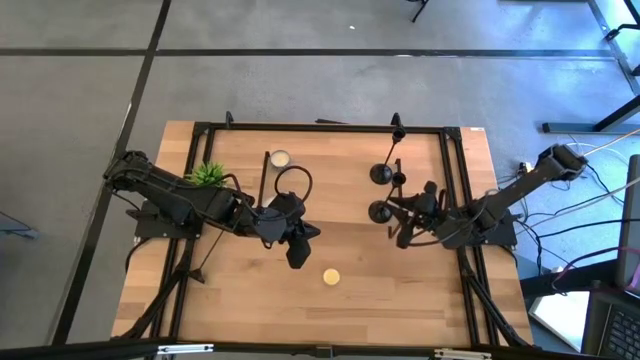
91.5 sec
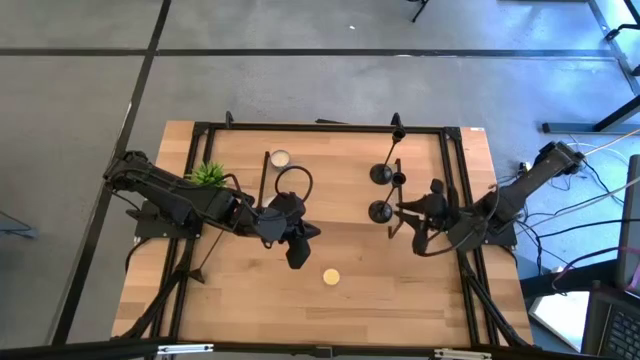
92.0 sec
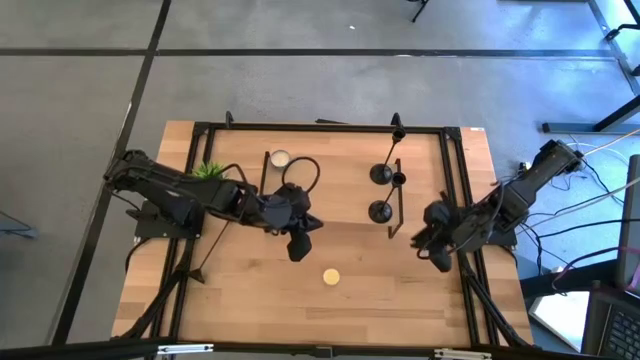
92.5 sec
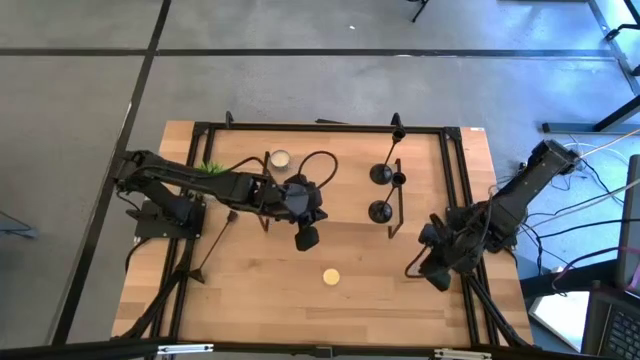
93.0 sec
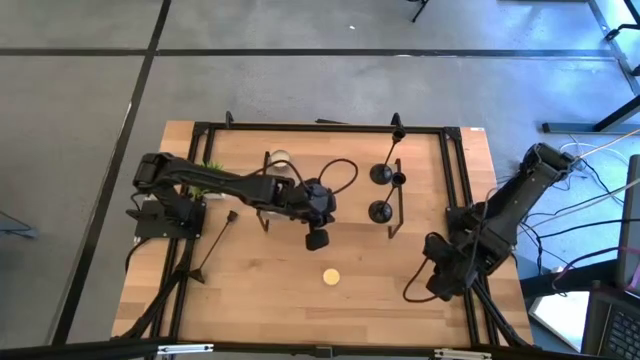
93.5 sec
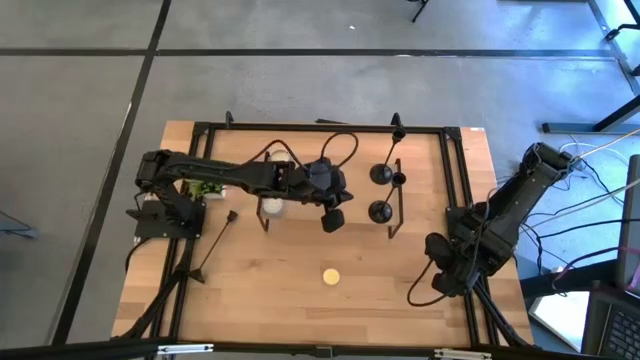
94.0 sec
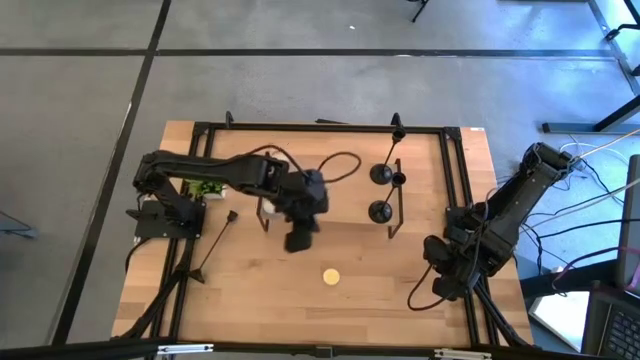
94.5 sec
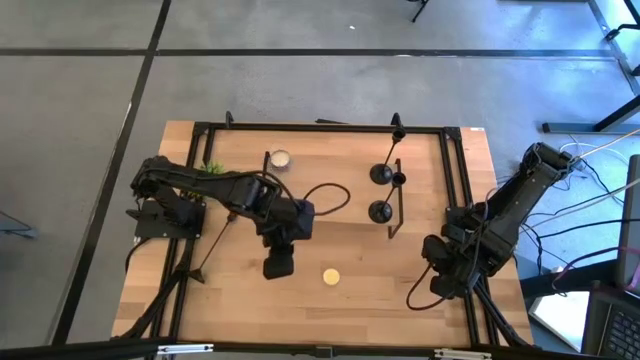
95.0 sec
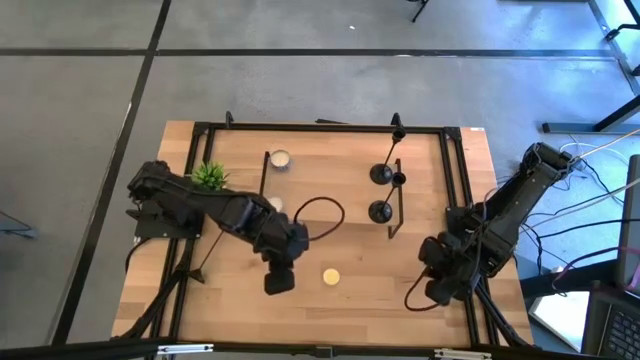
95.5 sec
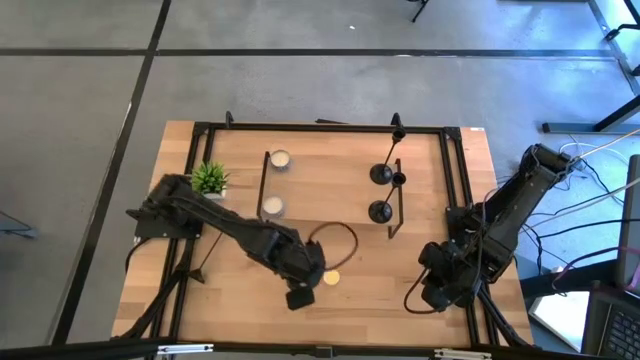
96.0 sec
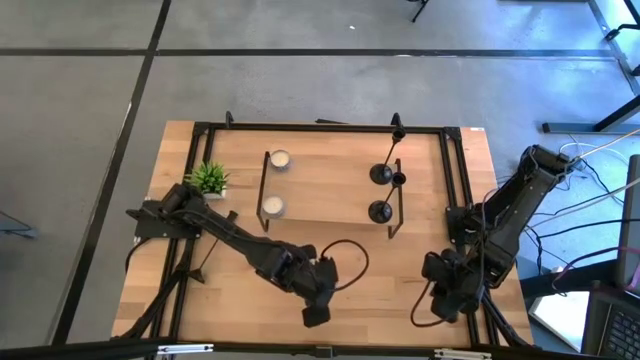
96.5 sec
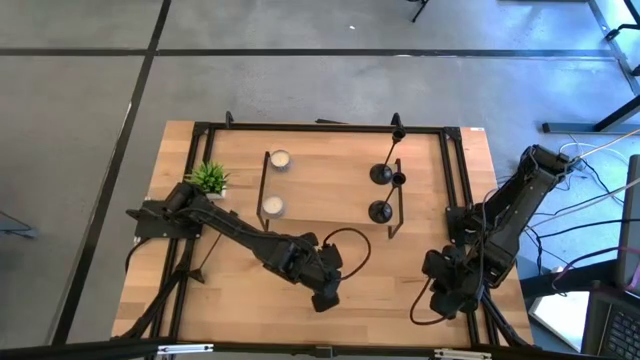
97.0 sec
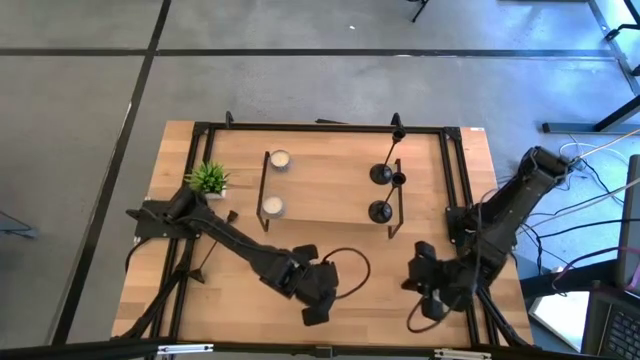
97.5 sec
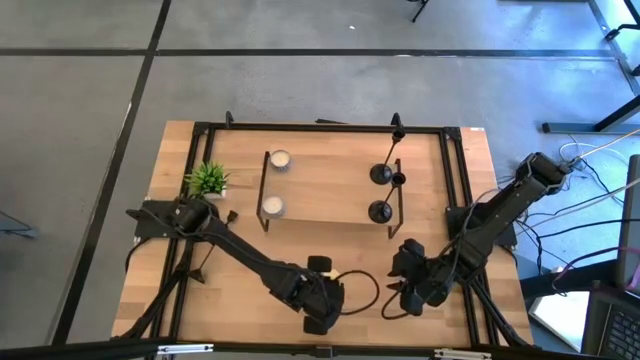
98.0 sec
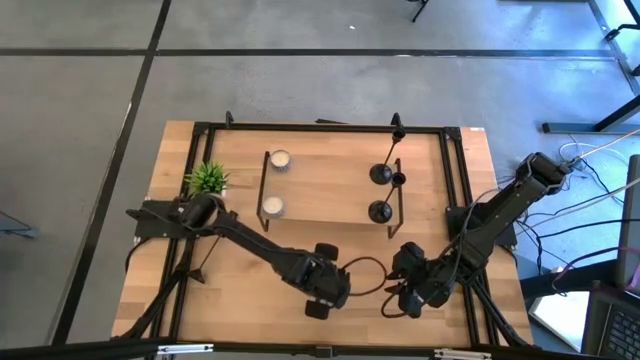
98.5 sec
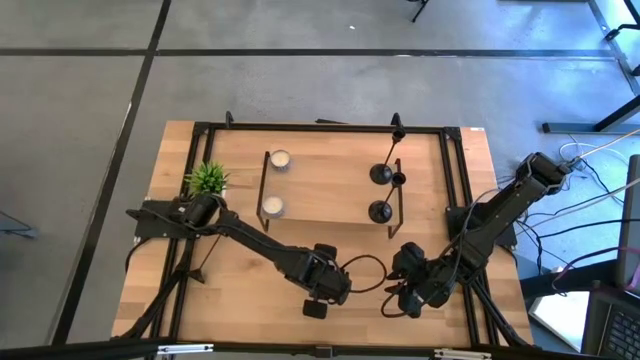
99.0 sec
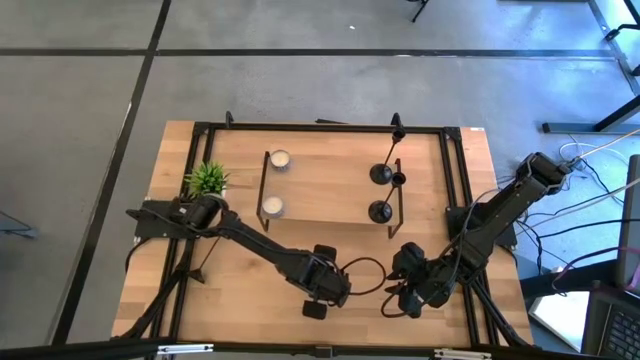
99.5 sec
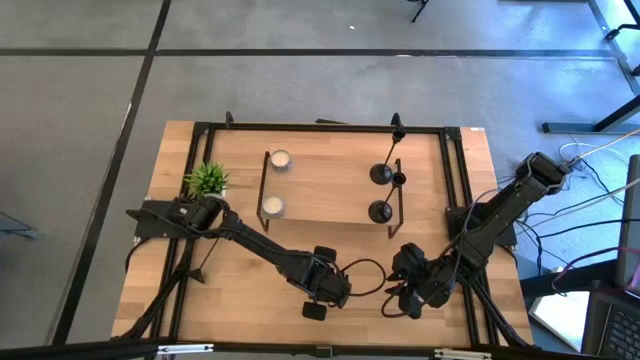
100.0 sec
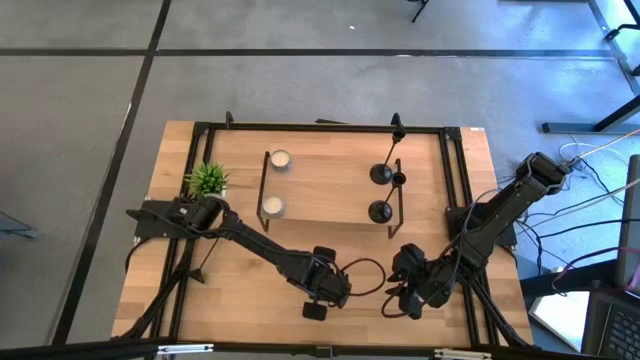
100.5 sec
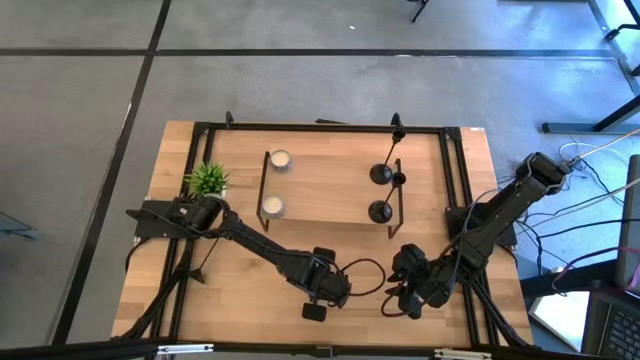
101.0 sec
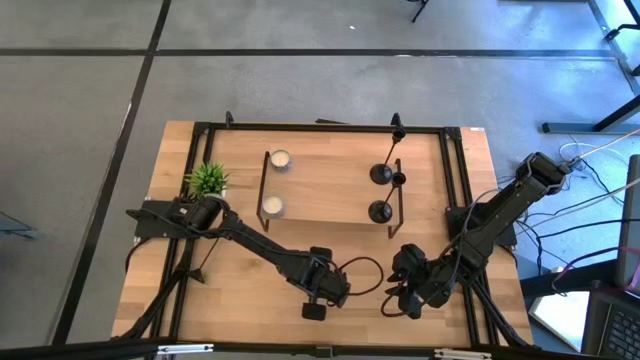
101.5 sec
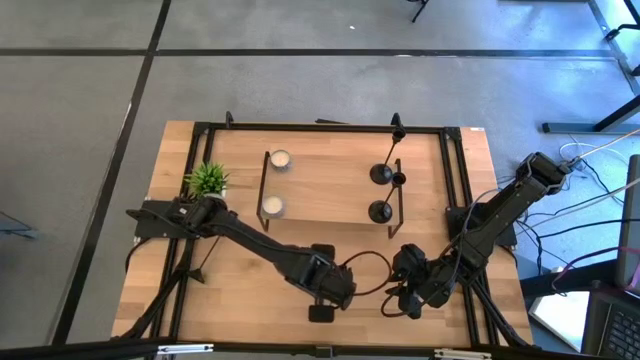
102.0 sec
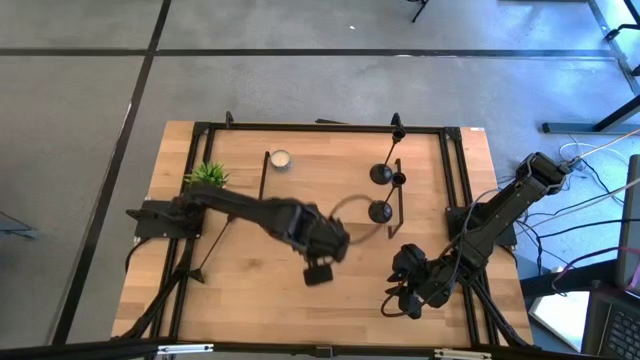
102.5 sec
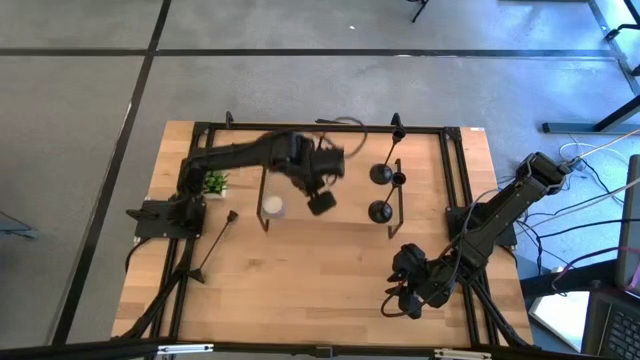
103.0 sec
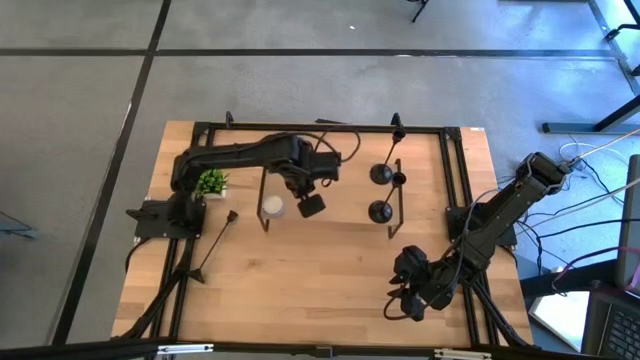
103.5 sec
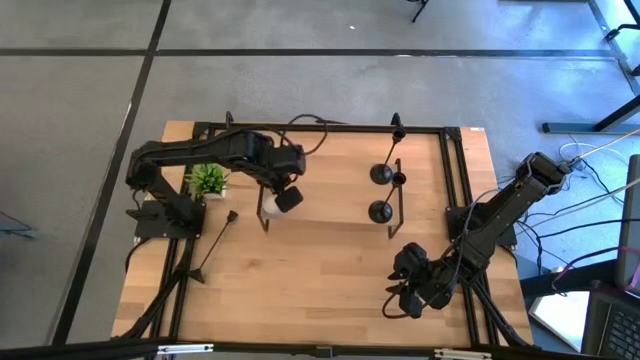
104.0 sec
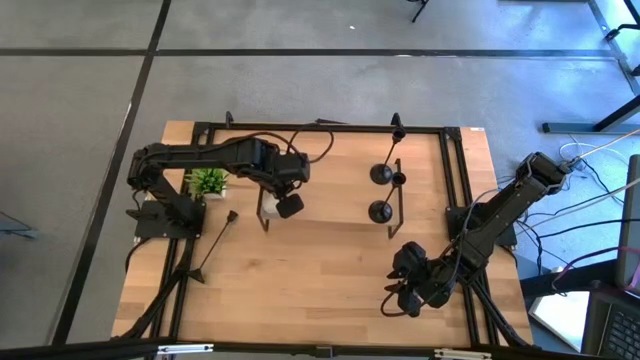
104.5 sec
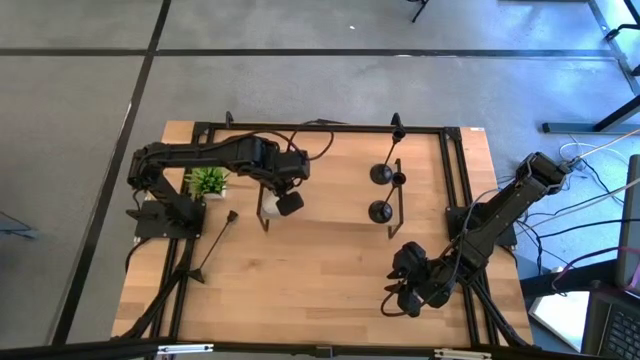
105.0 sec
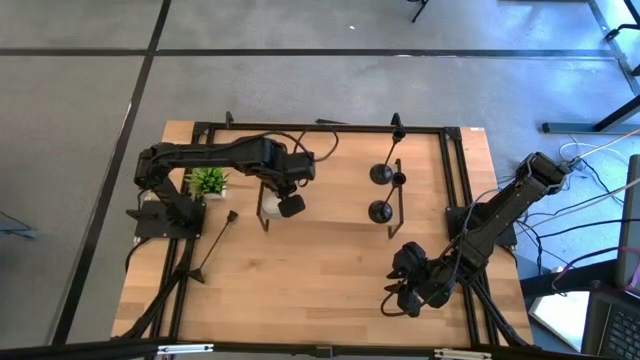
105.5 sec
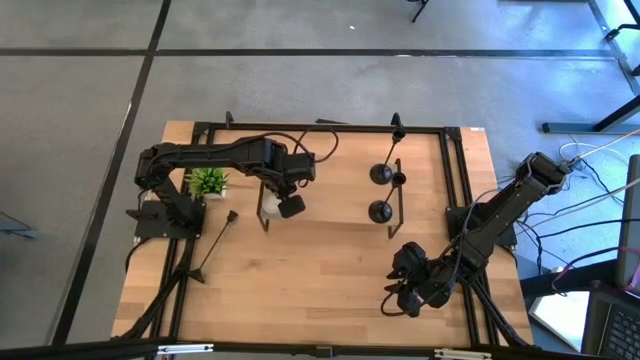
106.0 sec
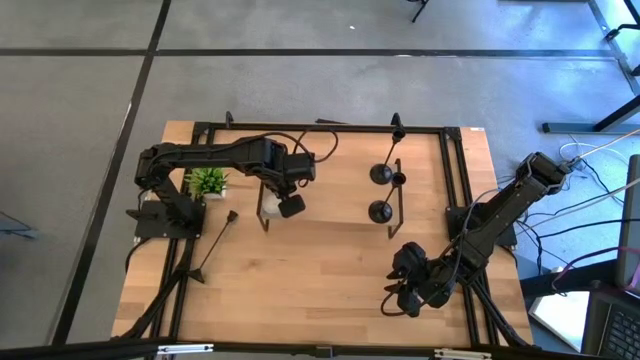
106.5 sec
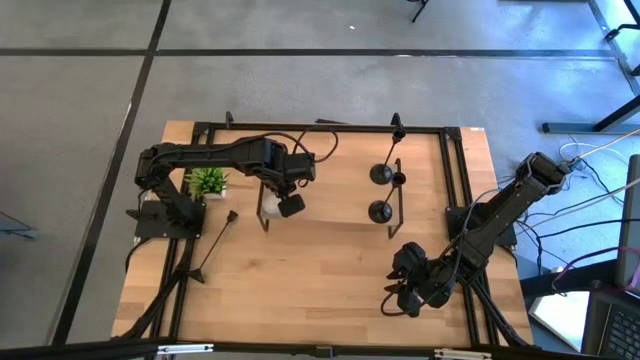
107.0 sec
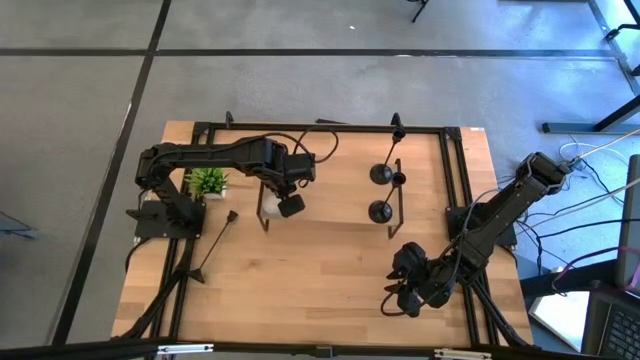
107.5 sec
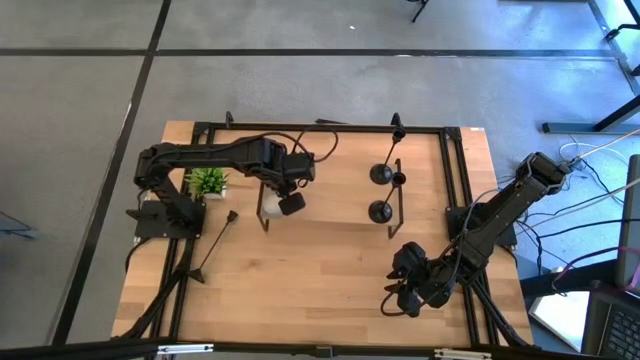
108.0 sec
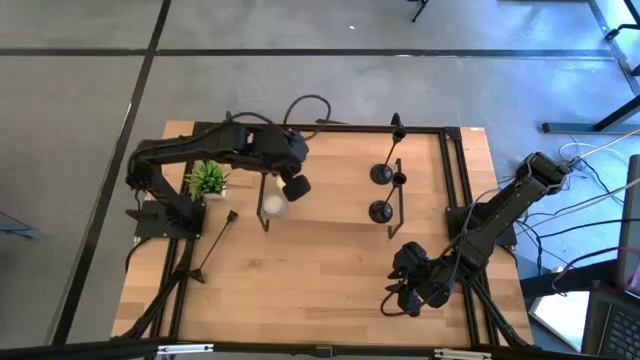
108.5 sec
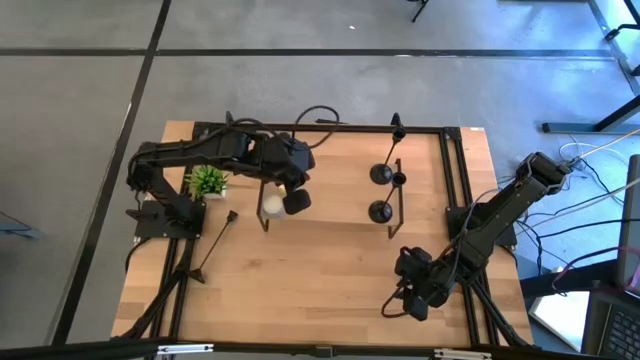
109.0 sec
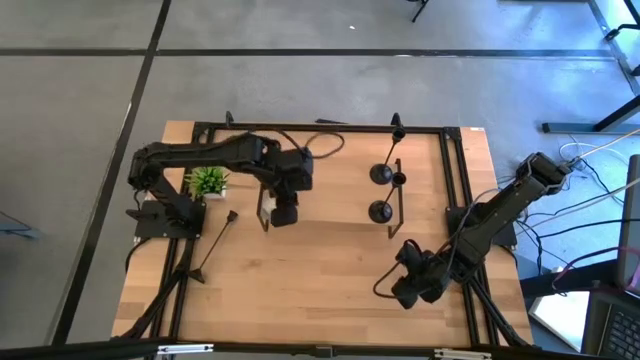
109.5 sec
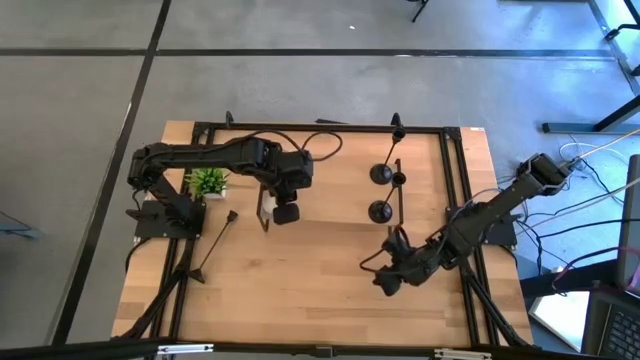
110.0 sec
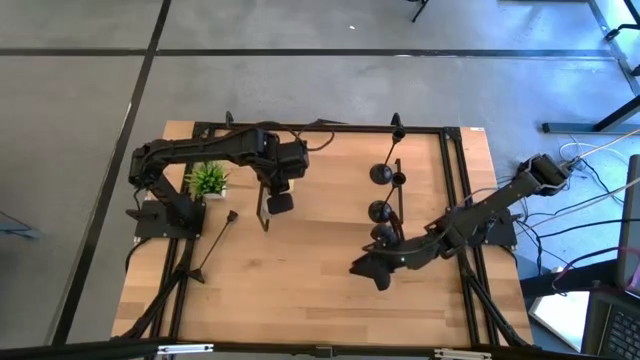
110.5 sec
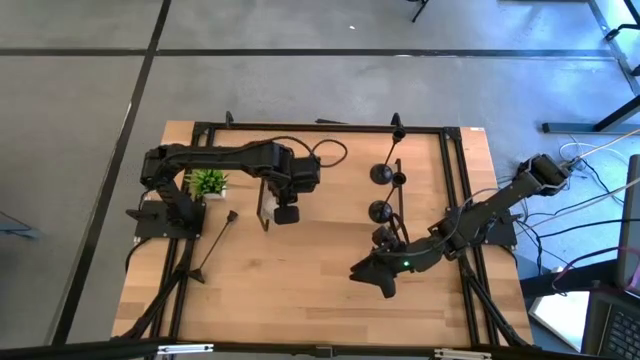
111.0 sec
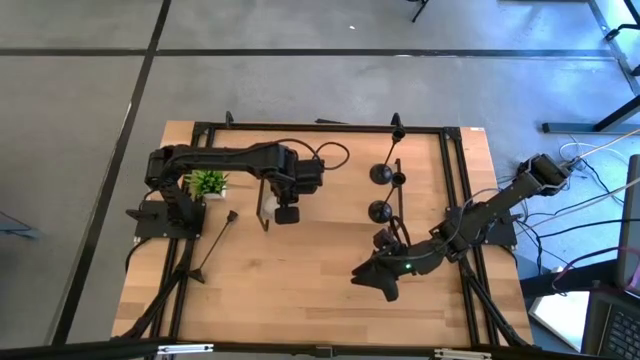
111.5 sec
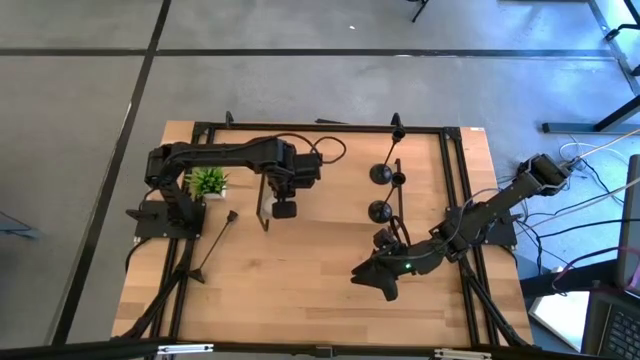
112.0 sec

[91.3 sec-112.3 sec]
Task: Pick & Place candle stick holders
Put the scented transparent candle on the shelf
